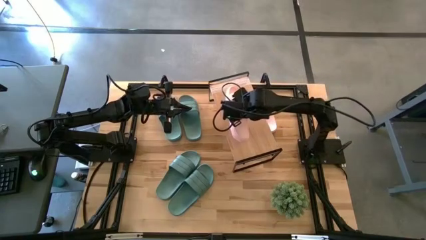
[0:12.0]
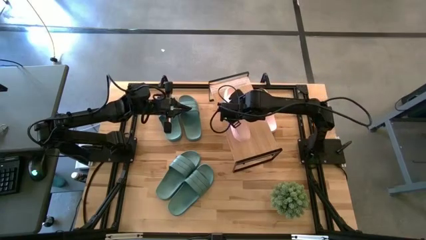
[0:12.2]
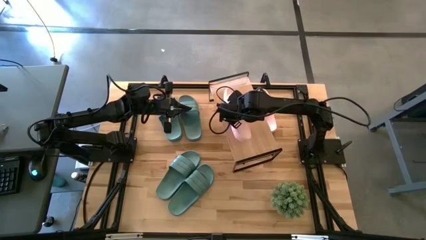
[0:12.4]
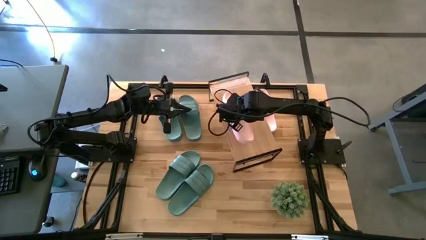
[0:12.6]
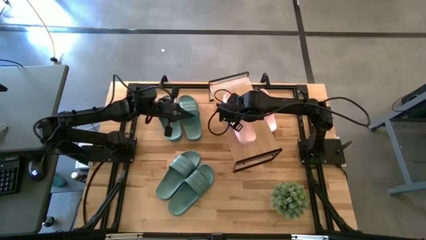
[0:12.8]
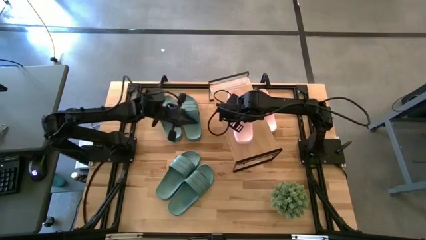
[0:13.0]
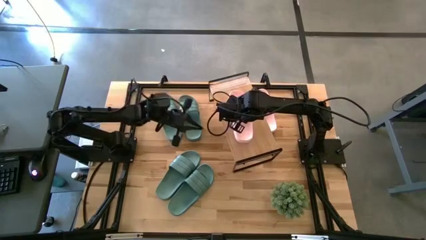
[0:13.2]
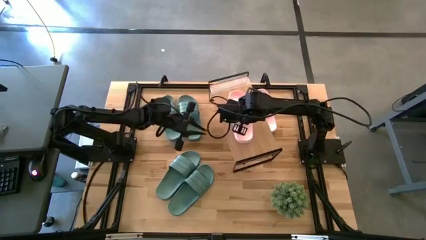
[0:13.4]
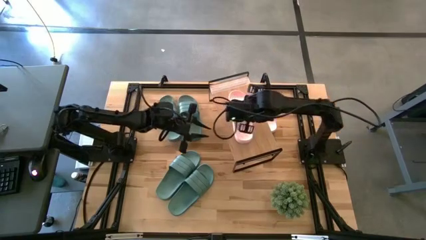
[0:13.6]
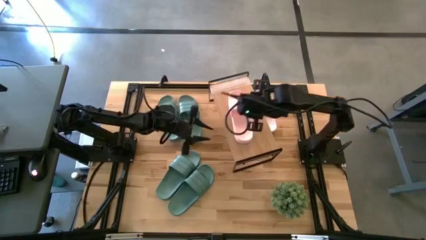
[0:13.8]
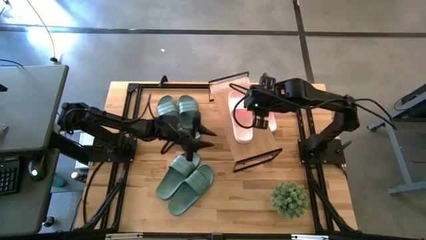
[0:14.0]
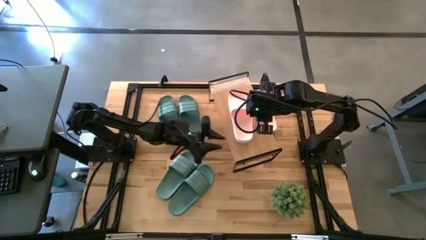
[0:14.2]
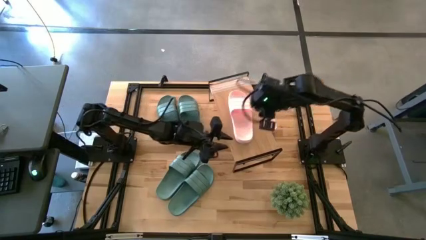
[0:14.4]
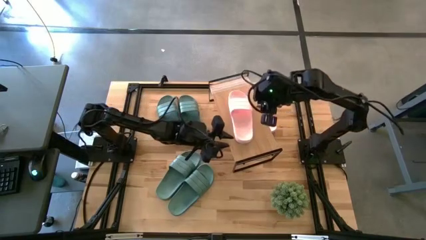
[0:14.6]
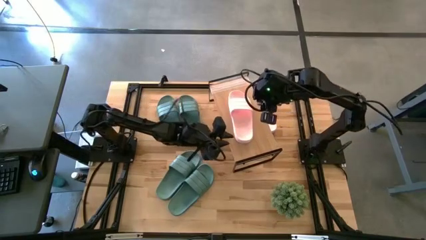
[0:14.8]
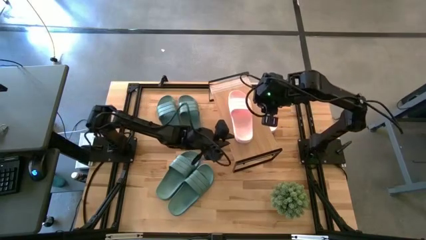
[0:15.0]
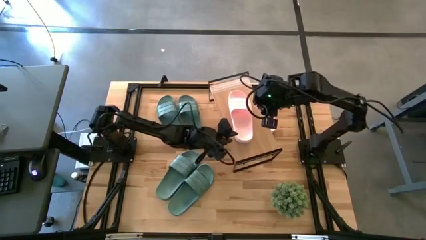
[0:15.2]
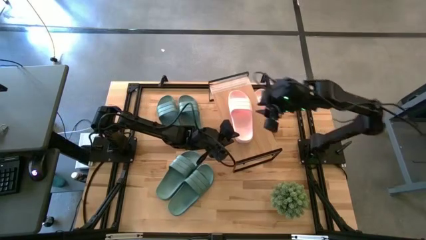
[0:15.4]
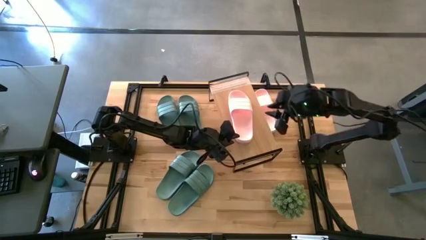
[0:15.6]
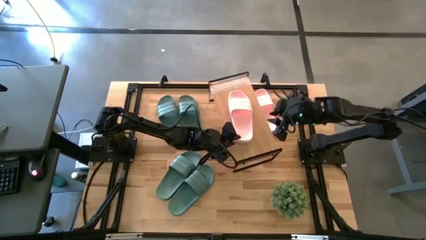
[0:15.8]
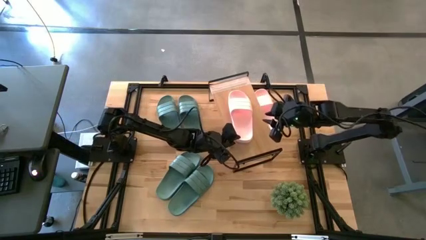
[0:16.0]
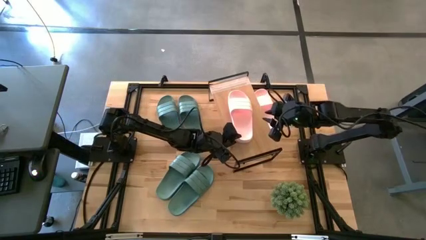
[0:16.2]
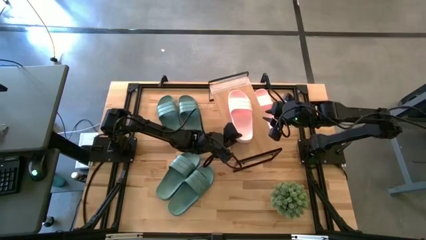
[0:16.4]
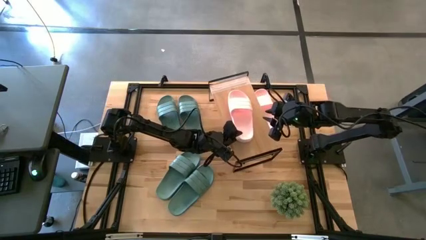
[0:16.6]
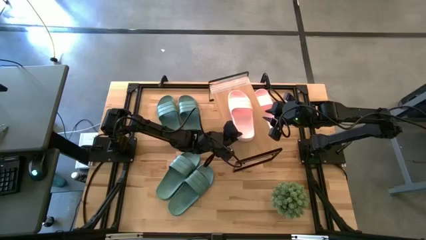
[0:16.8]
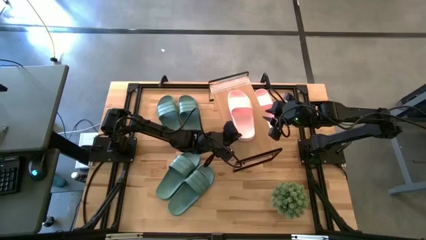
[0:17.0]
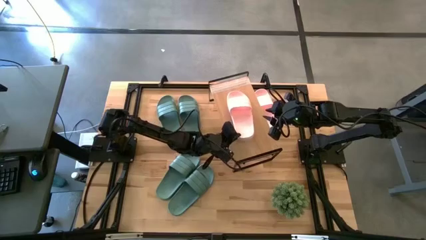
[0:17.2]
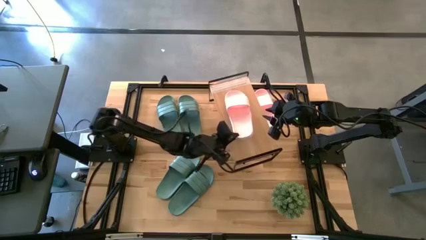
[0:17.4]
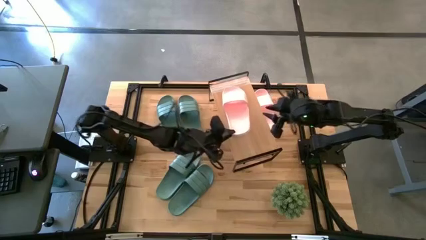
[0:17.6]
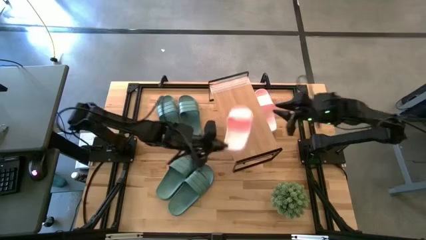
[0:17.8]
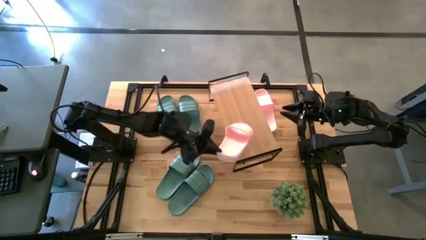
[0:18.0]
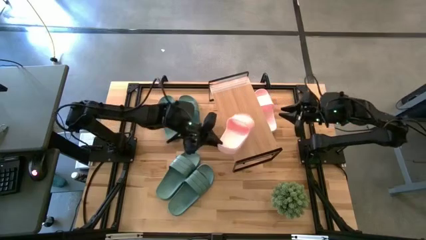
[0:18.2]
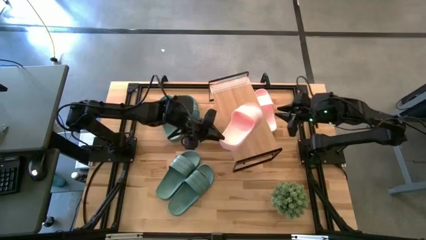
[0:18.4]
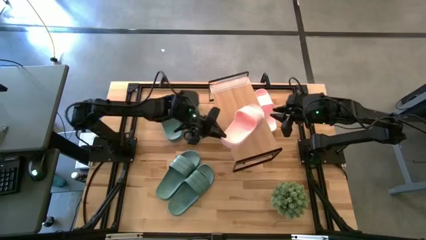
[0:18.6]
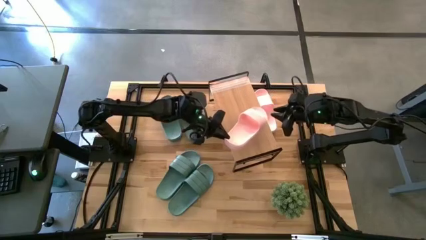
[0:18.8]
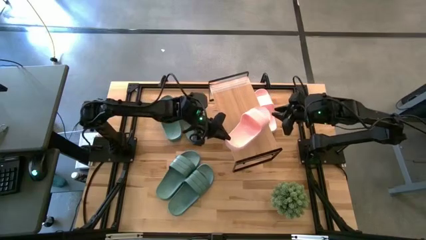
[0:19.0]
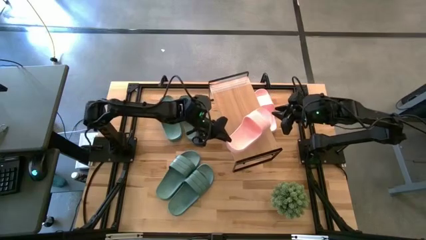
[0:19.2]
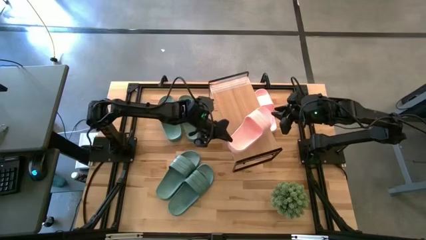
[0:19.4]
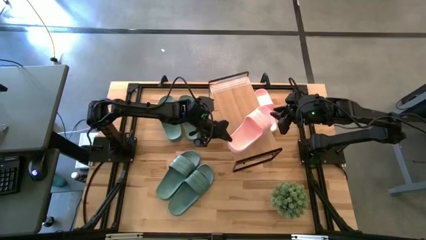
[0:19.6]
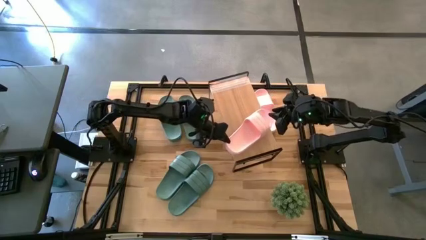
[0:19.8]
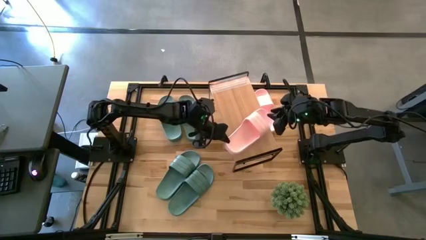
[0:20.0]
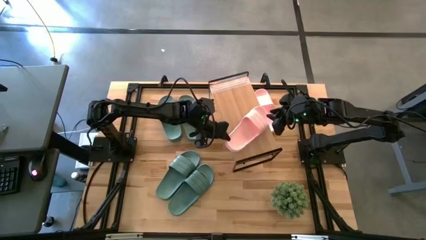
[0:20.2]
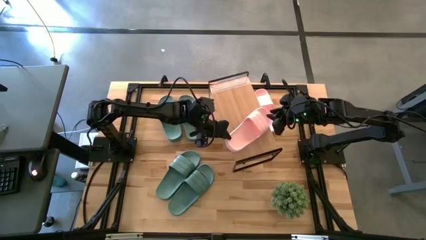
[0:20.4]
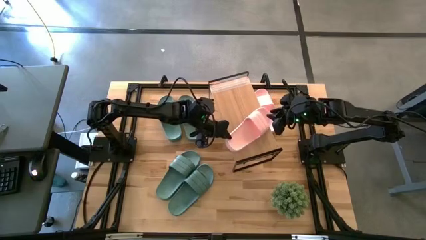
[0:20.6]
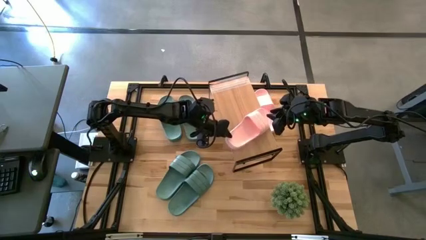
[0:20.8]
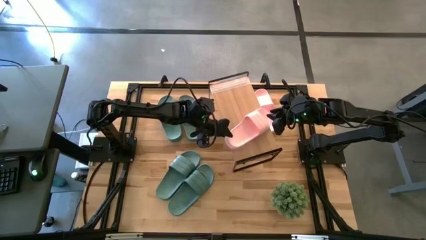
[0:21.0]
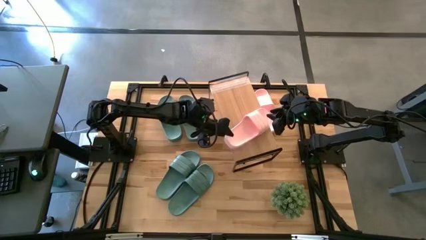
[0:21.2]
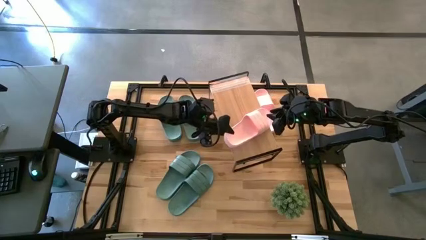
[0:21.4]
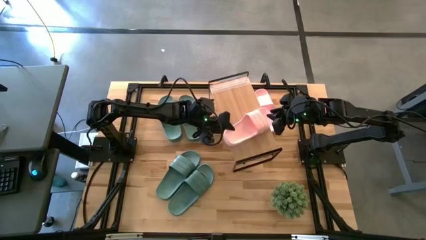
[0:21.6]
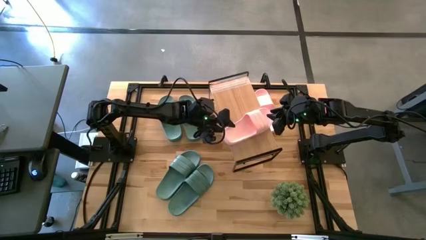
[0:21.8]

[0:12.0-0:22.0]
Task: Pick and place slides into the shelf
Put the pink slide on the shelf
